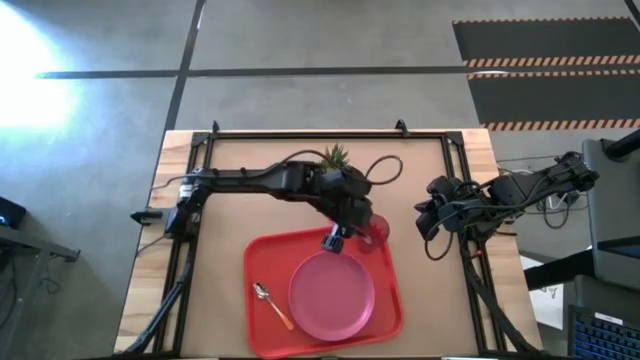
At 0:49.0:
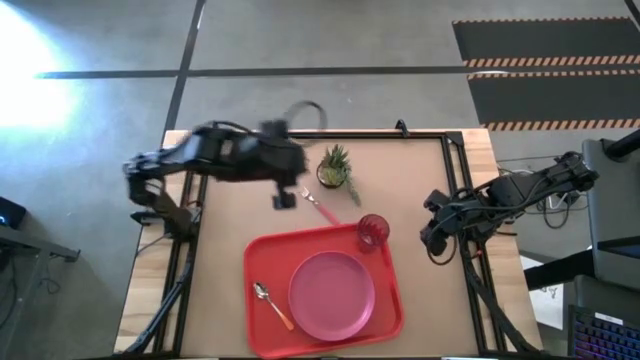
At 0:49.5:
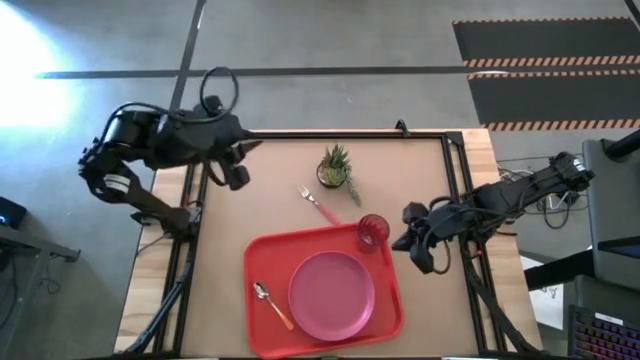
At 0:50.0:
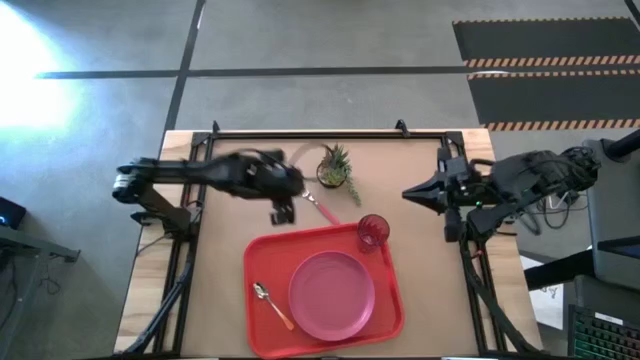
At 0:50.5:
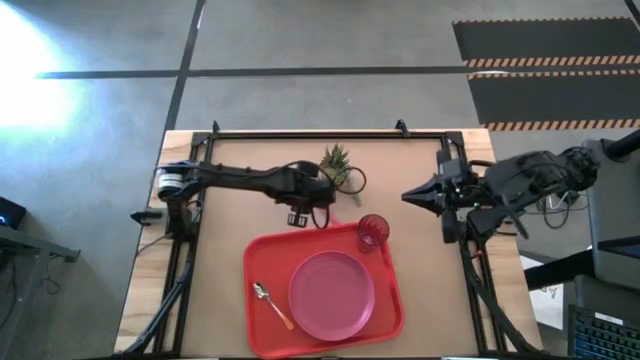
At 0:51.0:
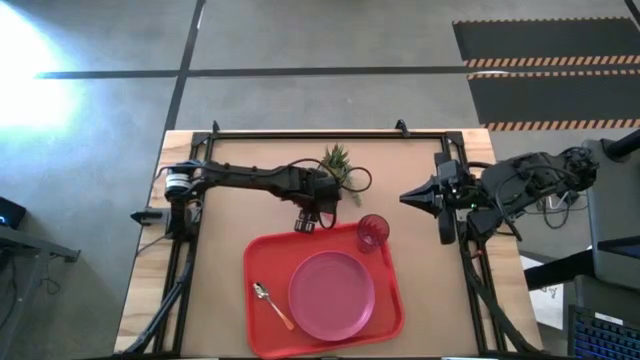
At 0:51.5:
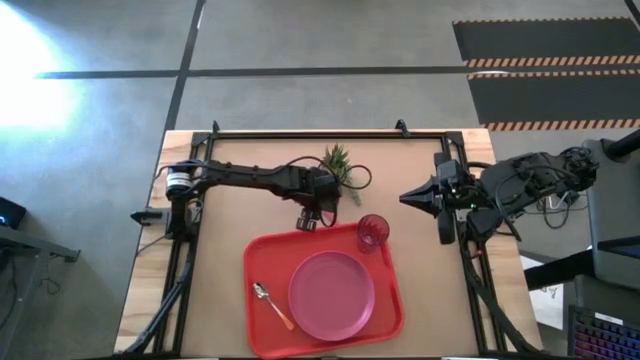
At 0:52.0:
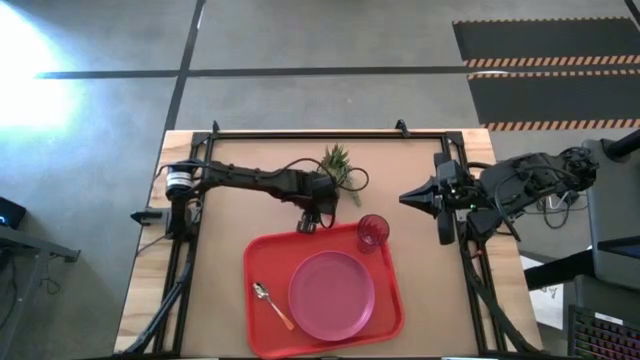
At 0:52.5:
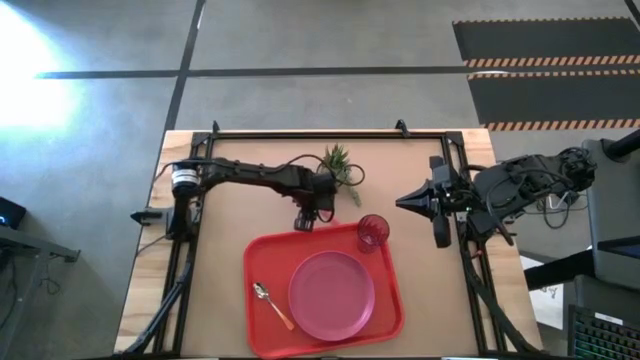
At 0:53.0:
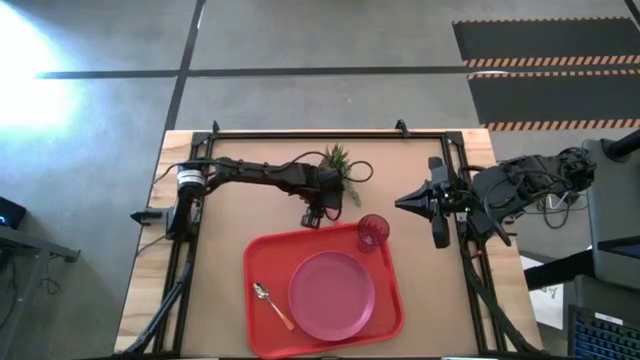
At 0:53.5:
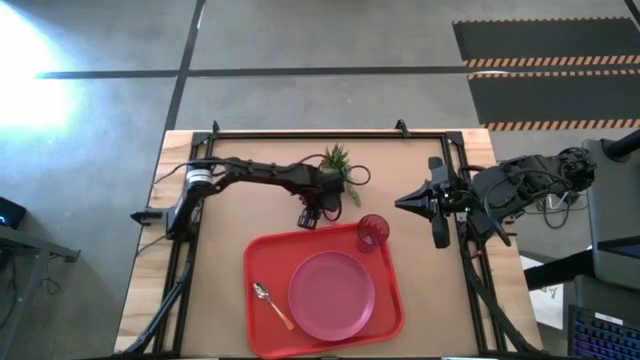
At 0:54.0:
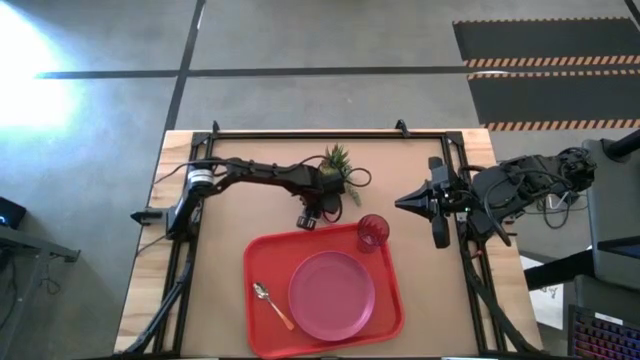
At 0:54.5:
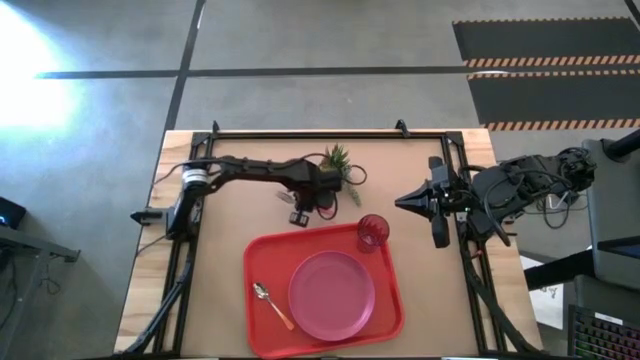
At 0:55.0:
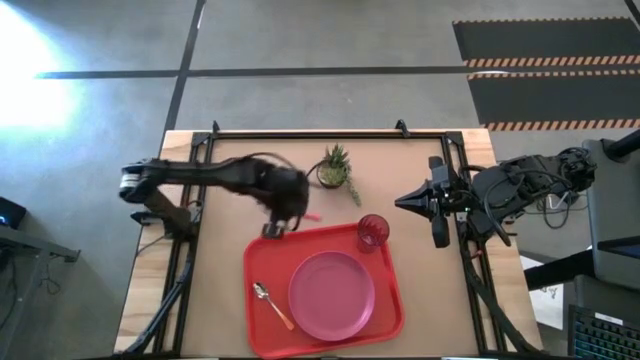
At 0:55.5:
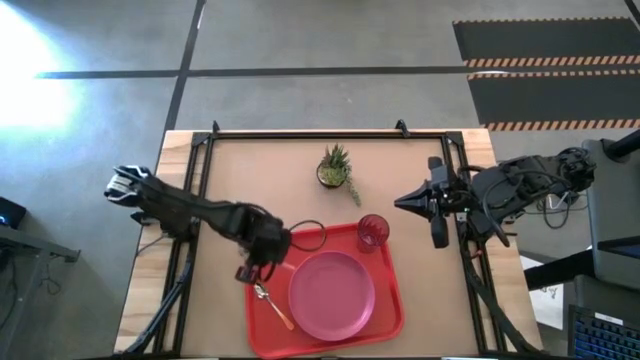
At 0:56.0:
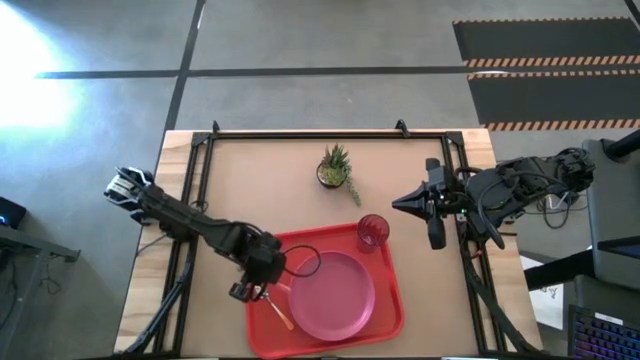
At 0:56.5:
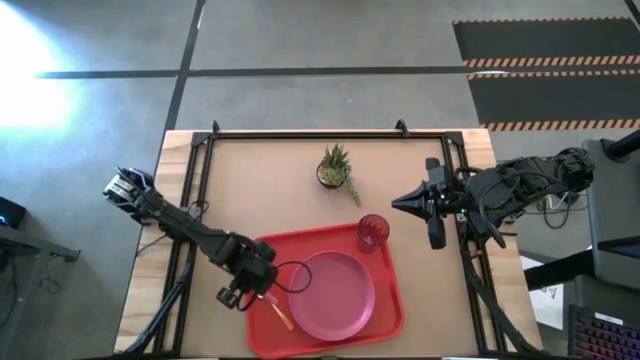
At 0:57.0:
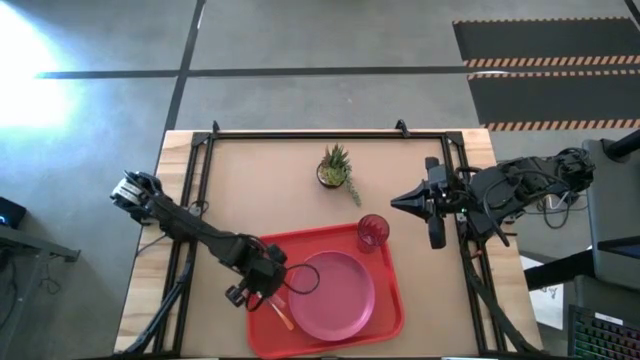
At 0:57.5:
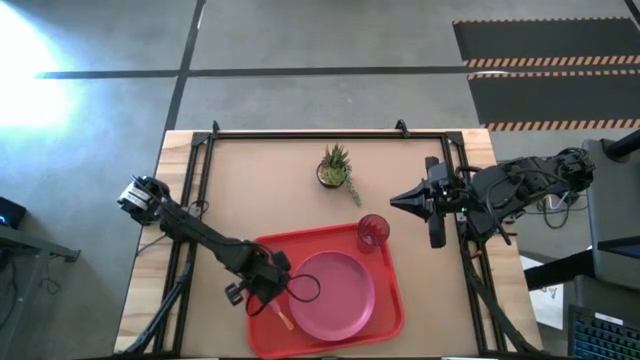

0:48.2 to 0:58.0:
Task: Pick and place plate/cup/fork/spoon on tray
Put the pink fork on the orange tray at the right of the pink plate

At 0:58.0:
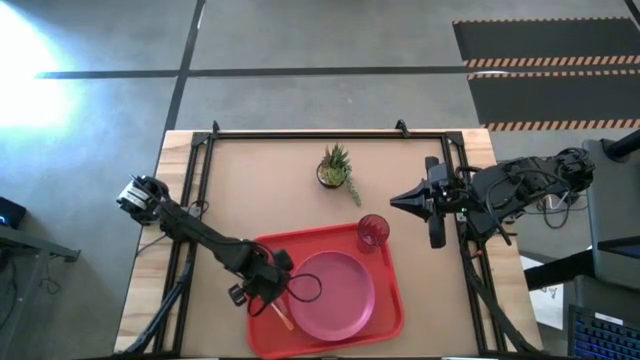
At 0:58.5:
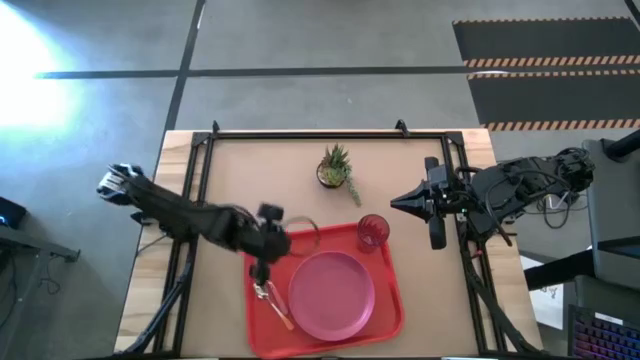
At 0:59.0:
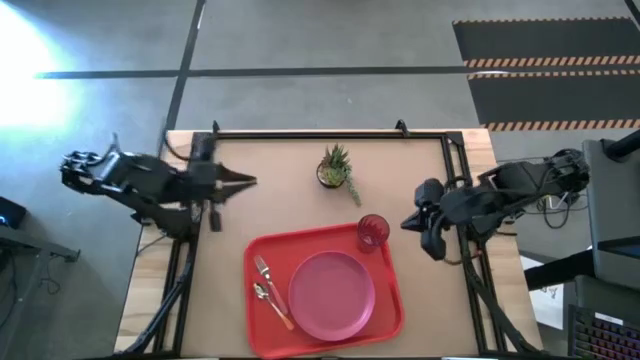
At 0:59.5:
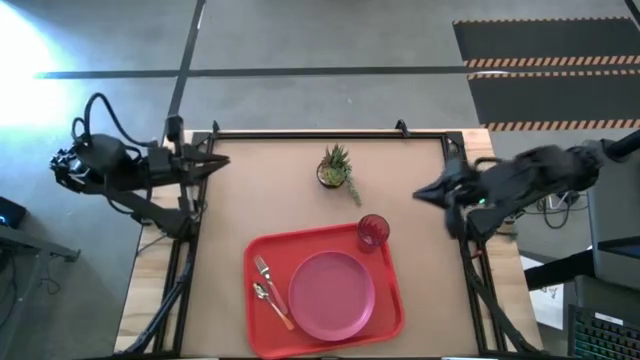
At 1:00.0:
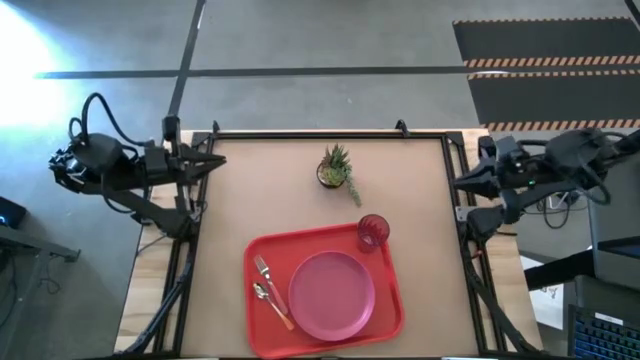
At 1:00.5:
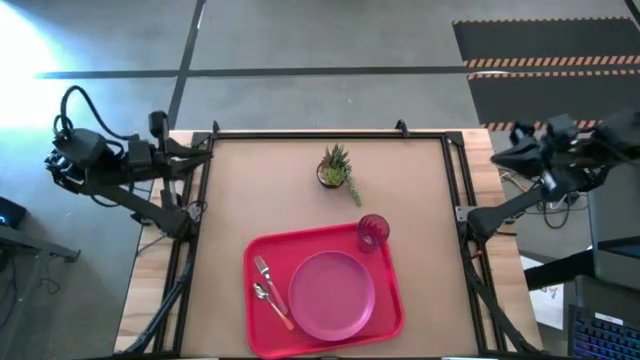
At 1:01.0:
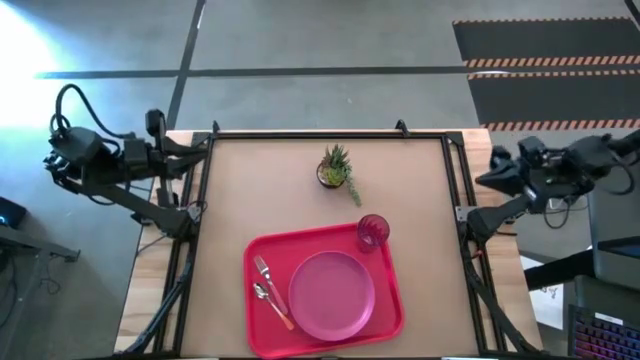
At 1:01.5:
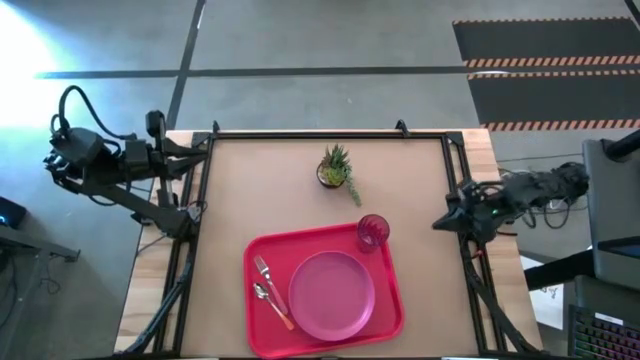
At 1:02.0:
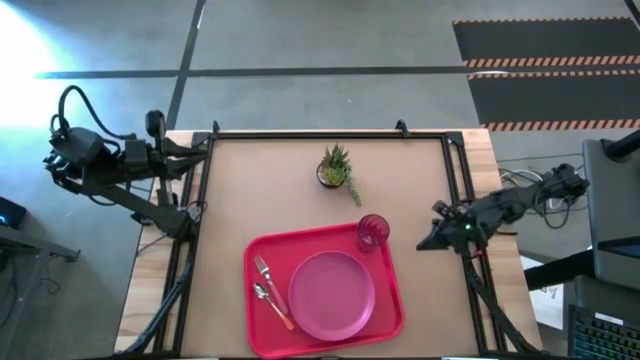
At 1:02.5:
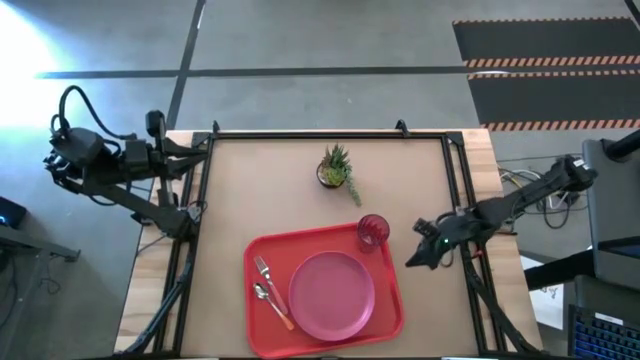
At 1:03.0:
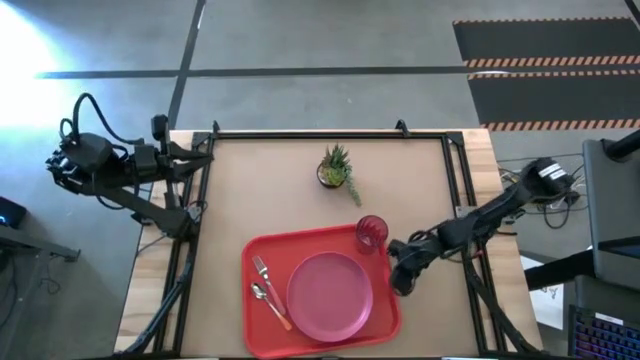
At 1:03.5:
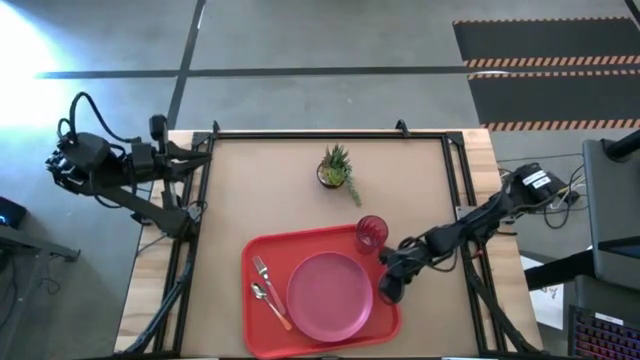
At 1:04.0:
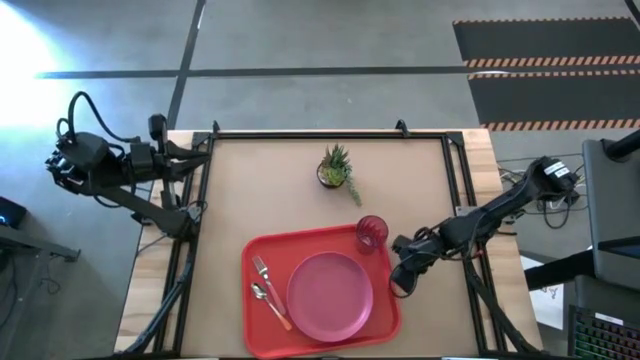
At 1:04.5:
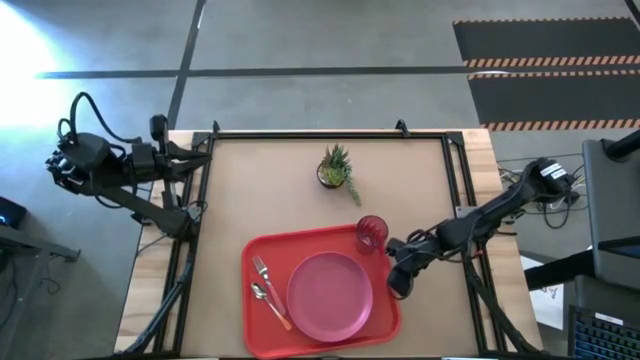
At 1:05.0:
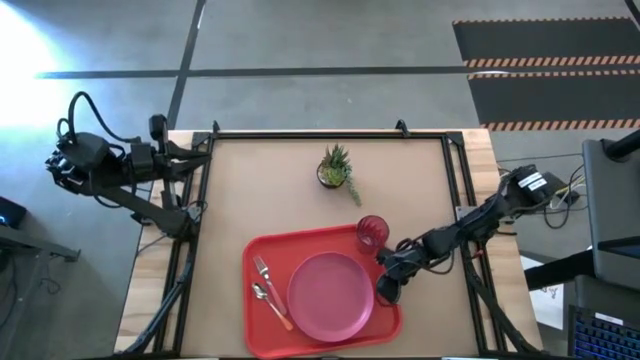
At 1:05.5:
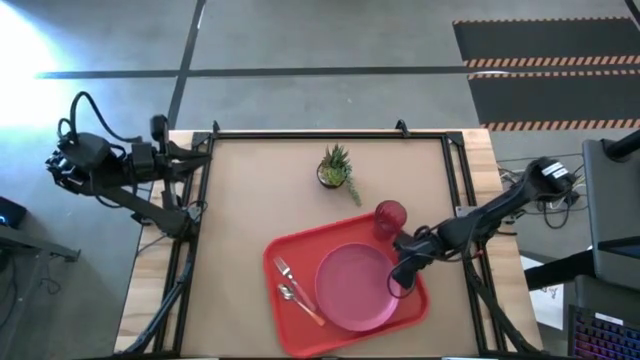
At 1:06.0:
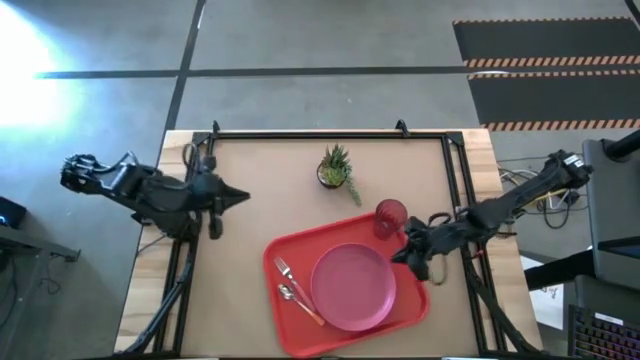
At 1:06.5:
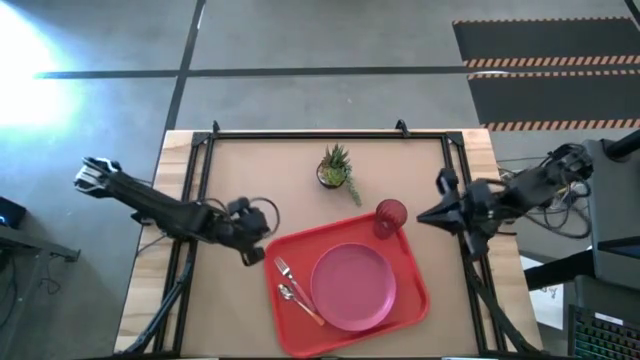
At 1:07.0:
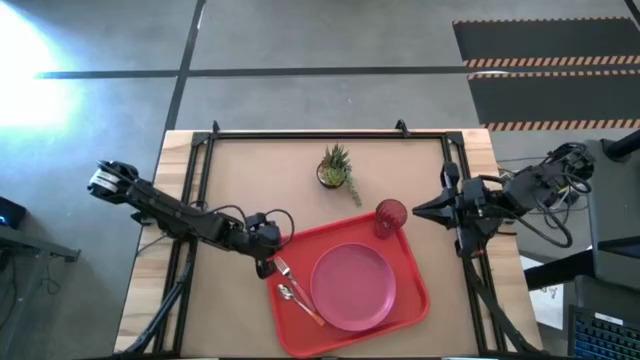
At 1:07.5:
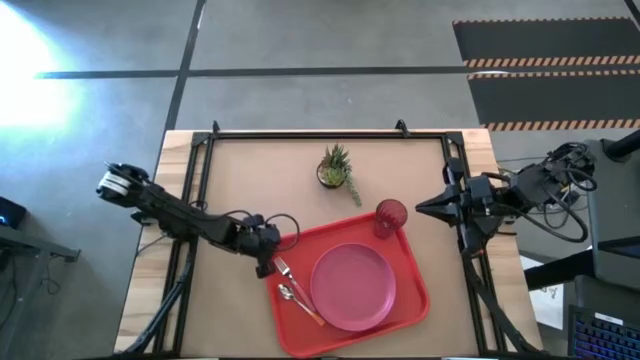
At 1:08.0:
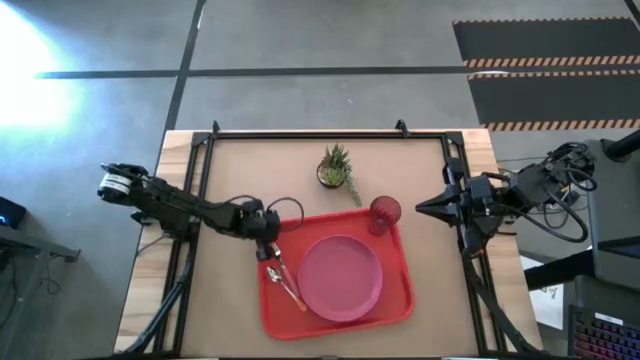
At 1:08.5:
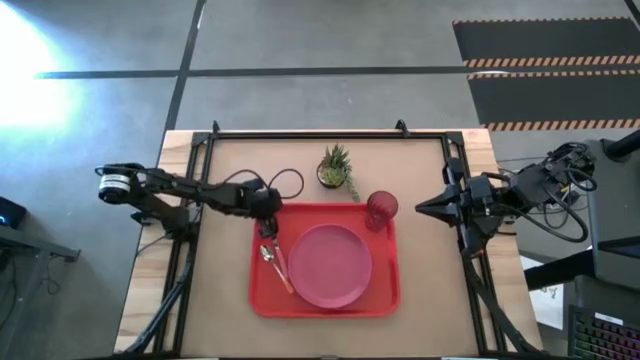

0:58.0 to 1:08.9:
Adjust the orange tray on the table

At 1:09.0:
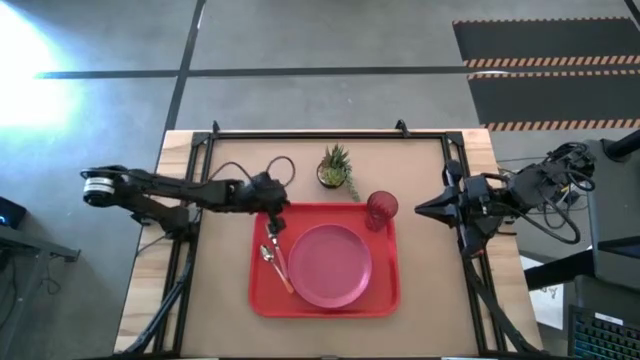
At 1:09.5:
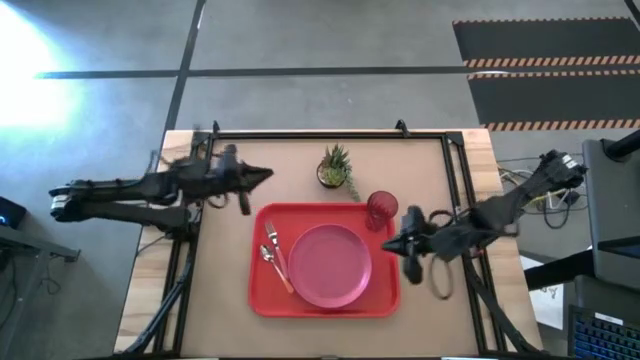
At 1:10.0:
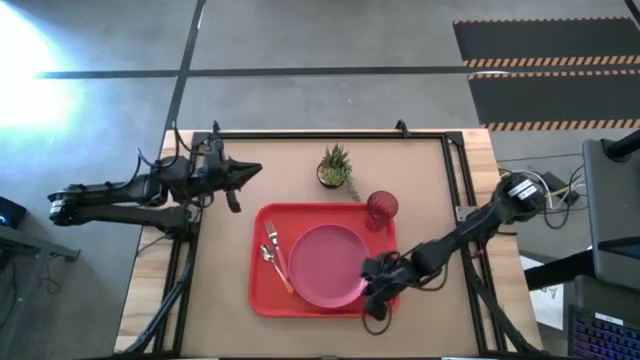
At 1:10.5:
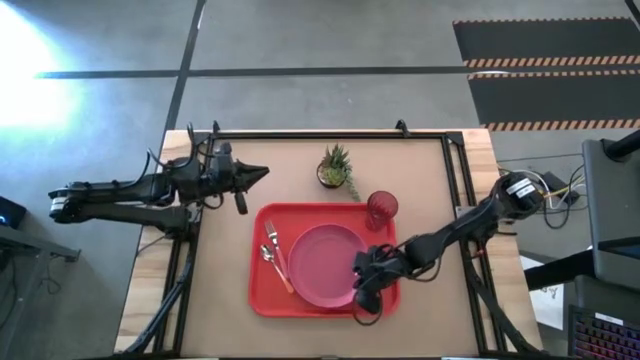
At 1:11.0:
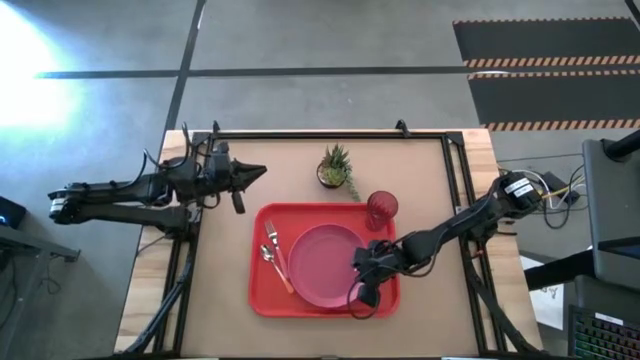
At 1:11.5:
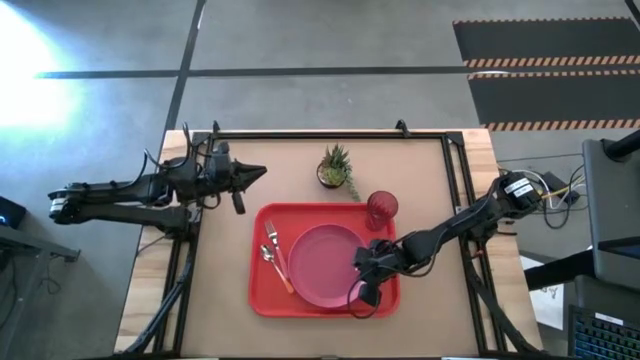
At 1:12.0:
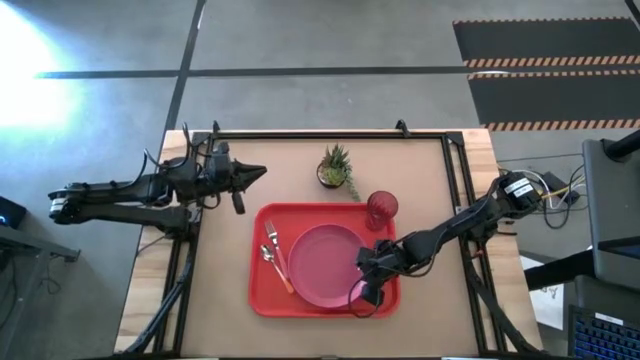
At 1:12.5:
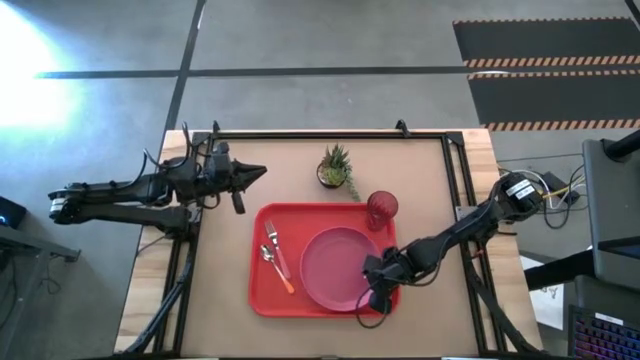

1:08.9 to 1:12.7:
Adjust the pink plate on the orange tray
